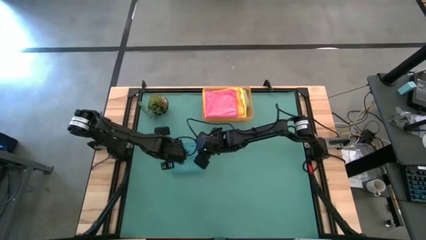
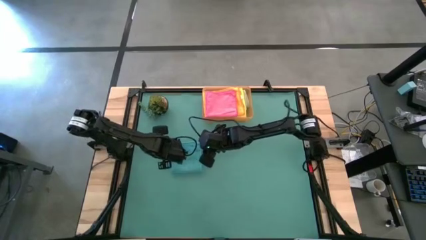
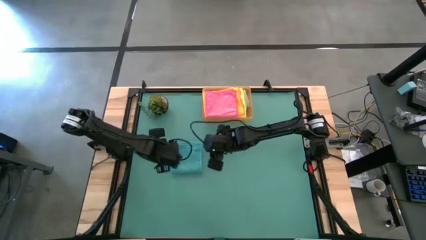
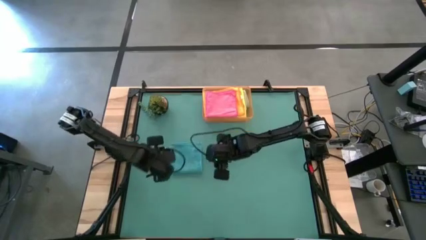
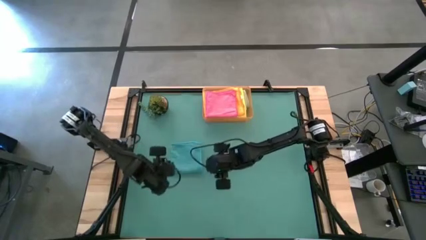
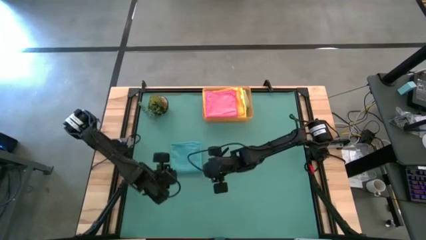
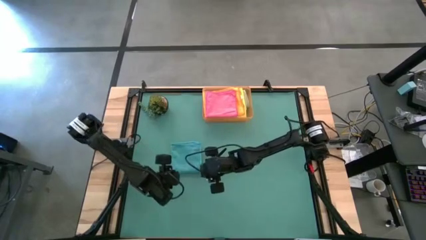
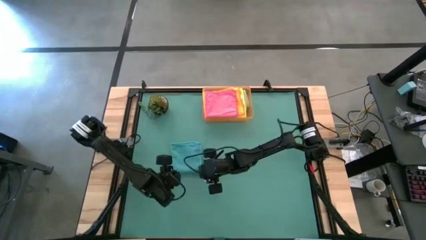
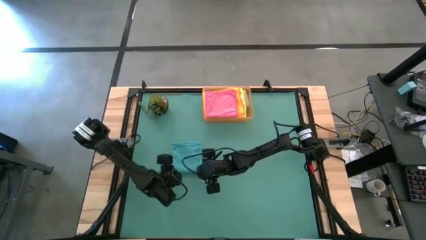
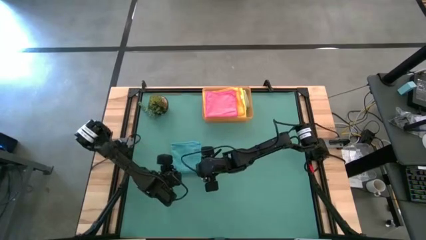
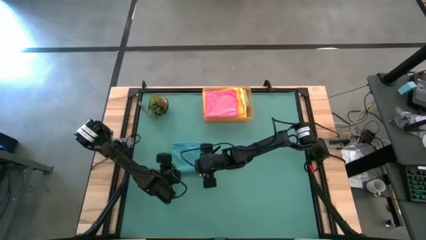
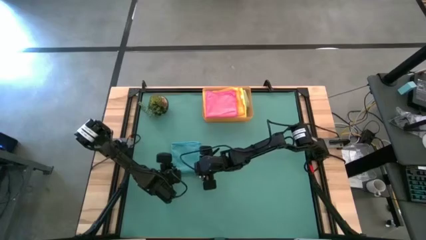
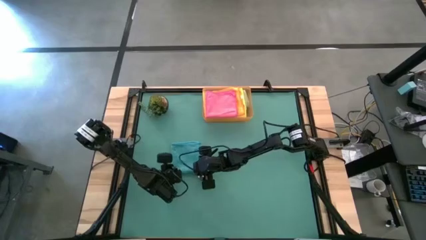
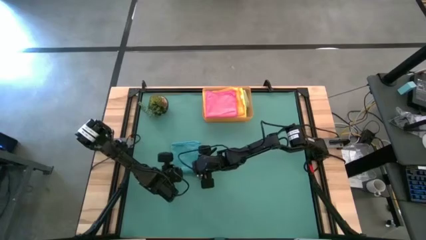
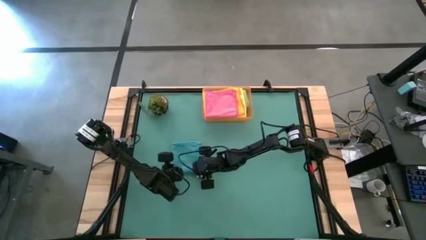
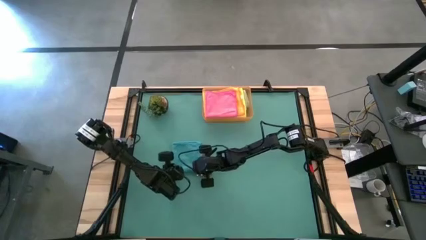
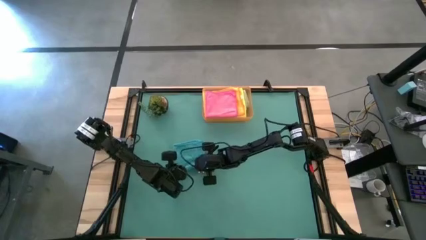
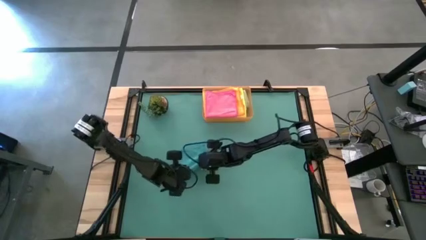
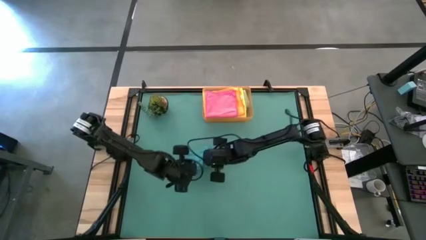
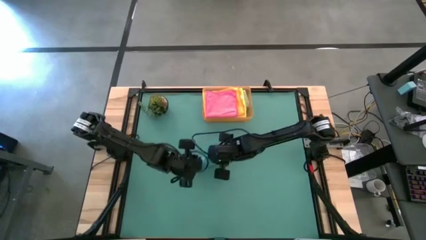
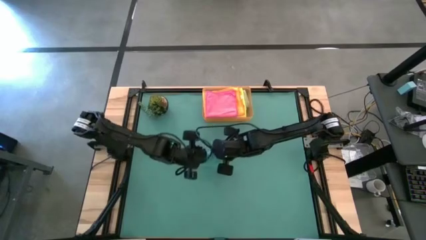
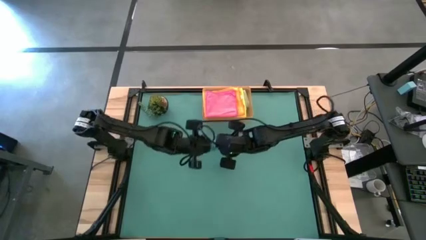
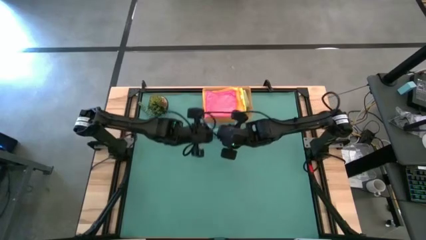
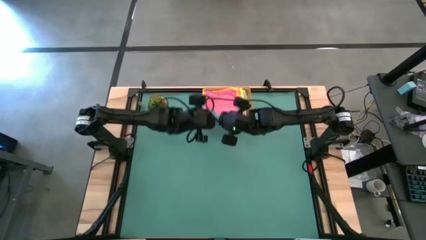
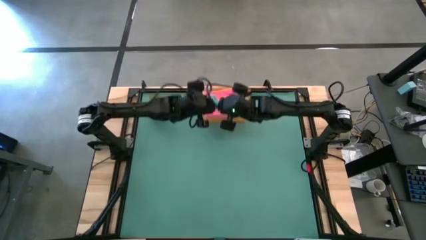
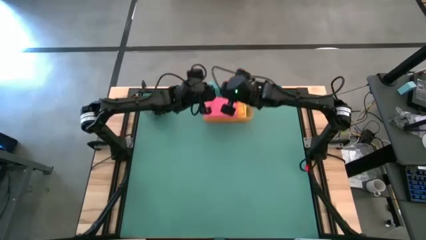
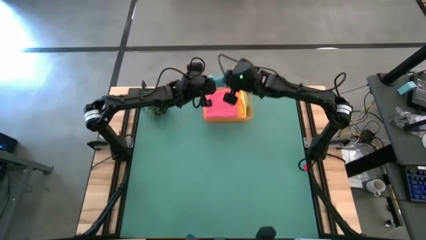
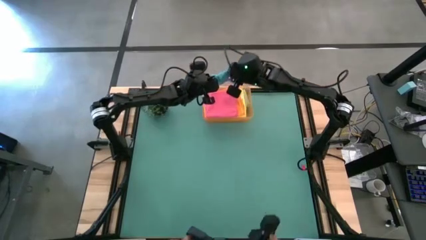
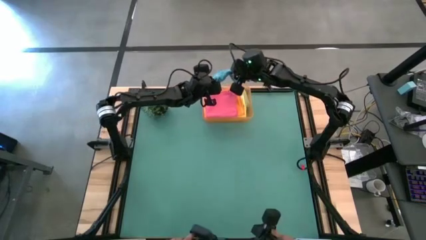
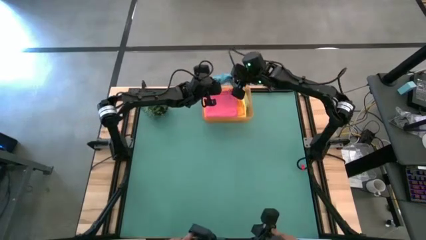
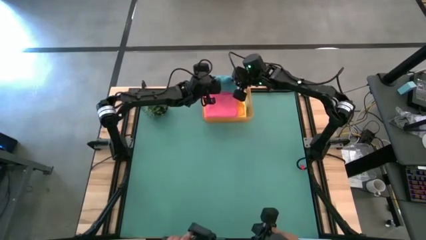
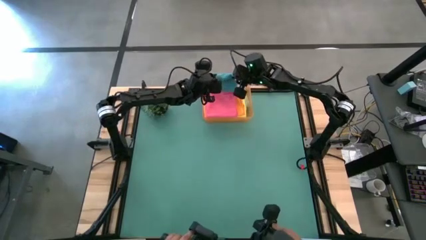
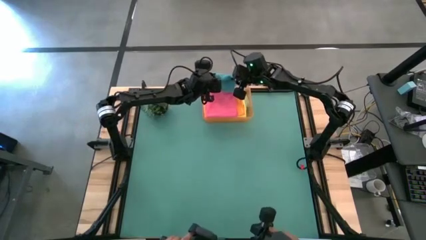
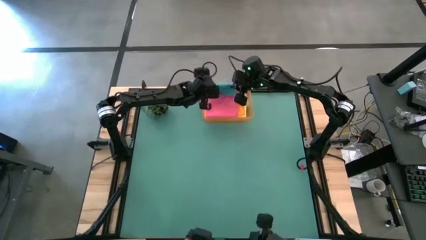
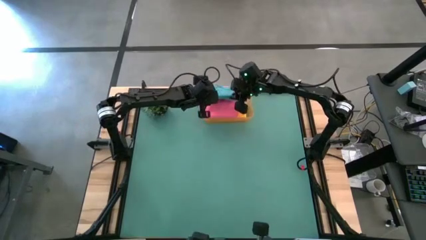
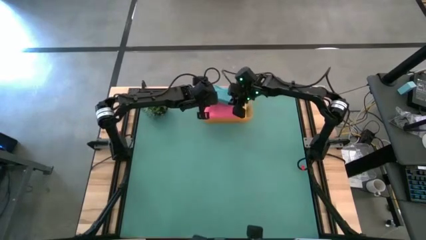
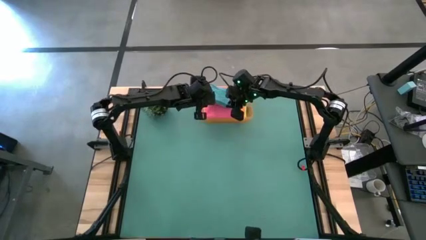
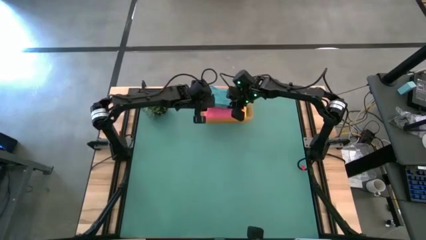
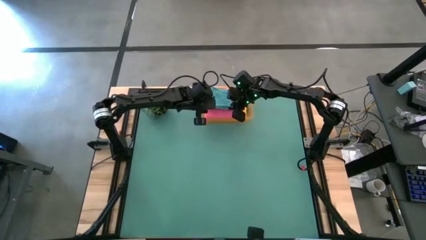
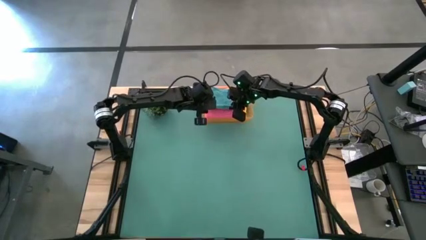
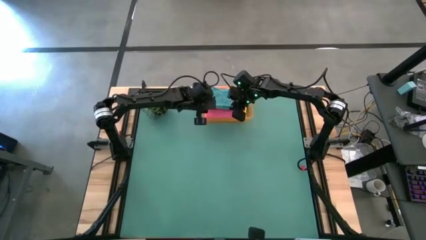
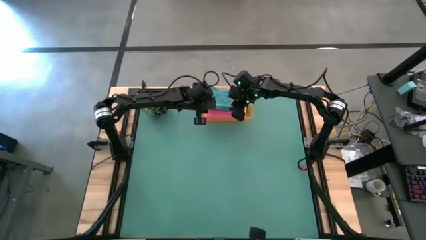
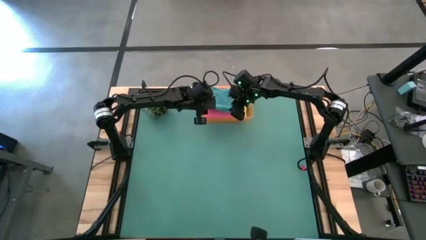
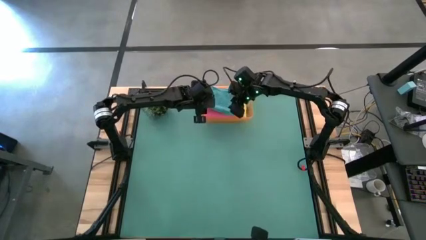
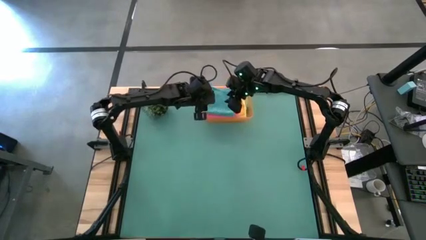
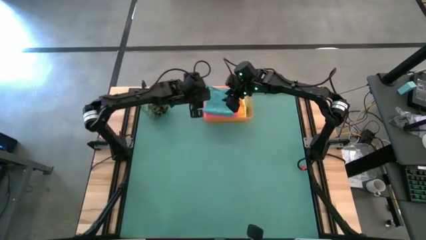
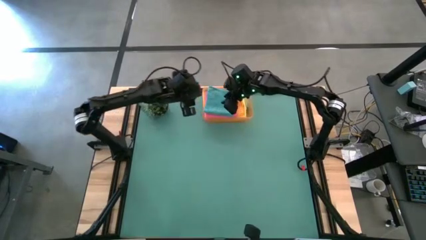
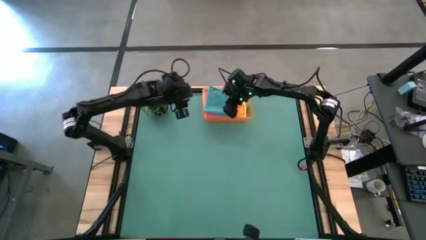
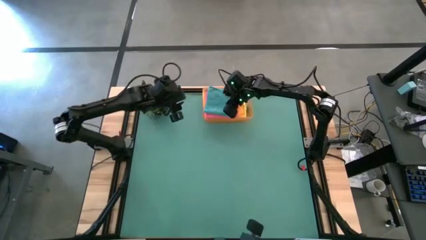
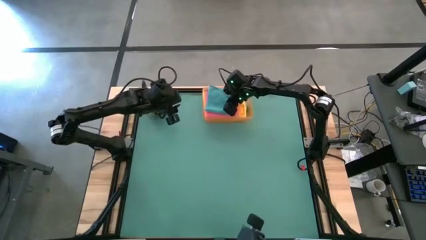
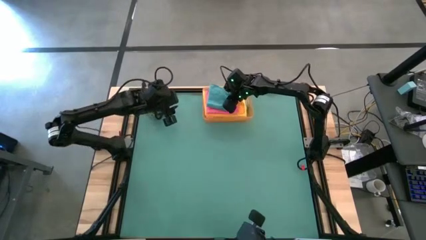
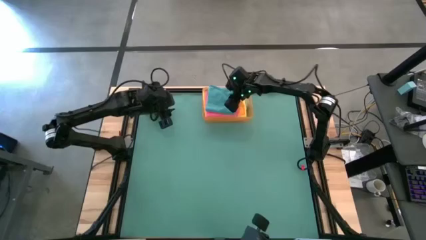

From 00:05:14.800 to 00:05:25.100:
Task: Fold microfiber towels
Put the folded green towel into the orange bin

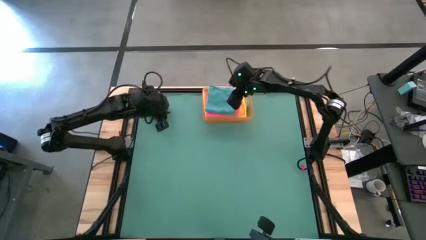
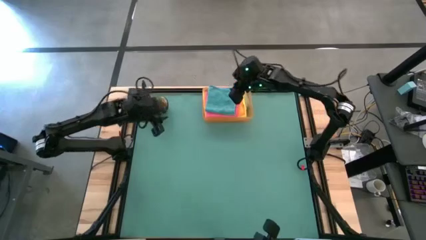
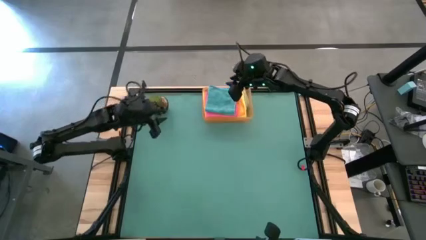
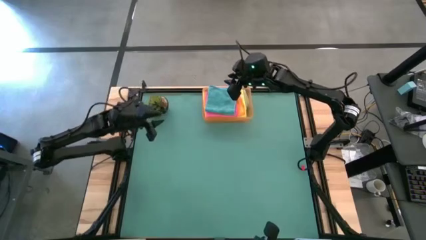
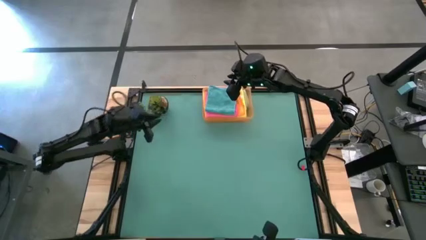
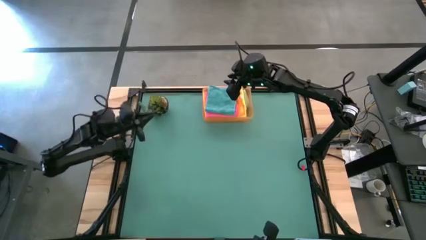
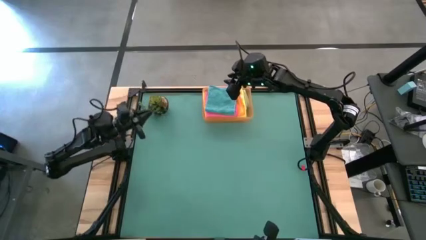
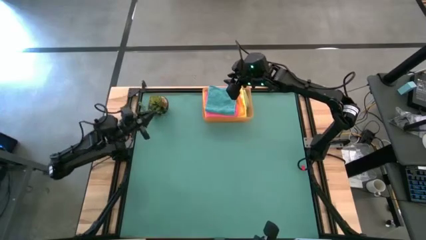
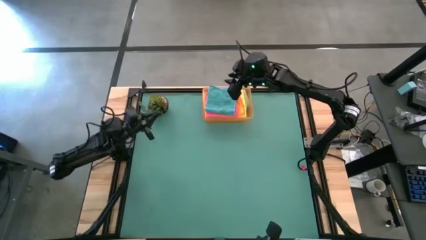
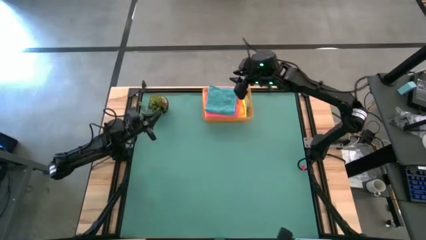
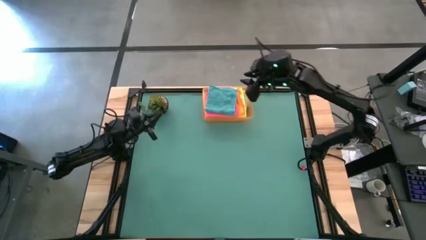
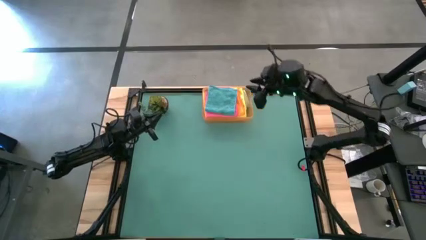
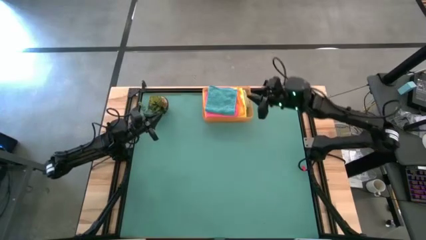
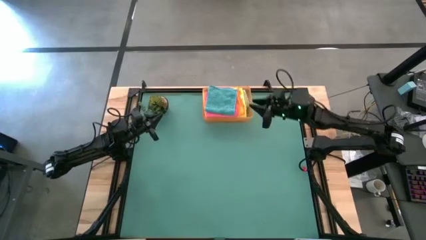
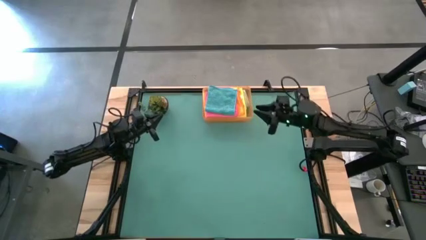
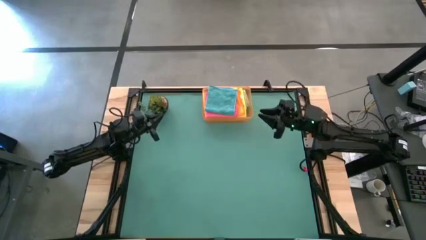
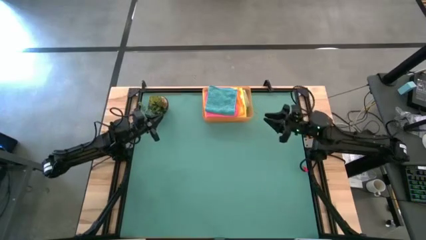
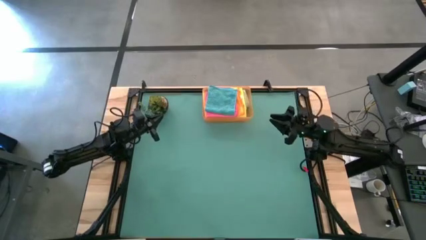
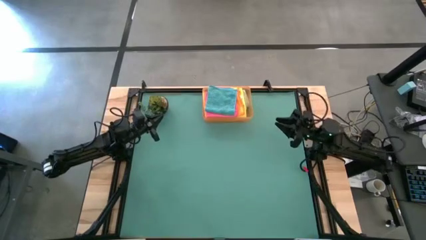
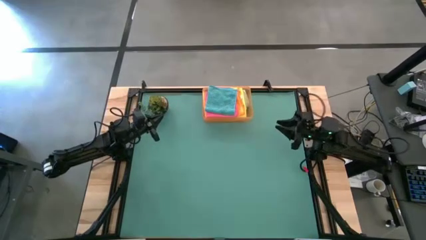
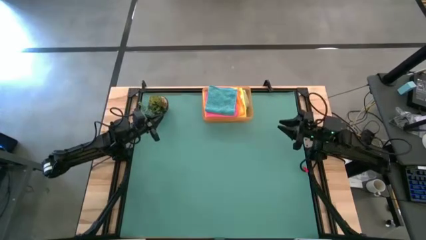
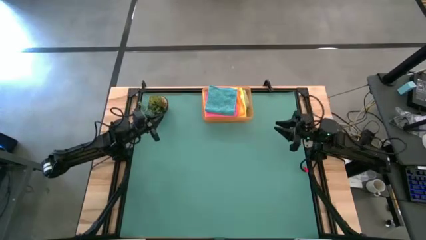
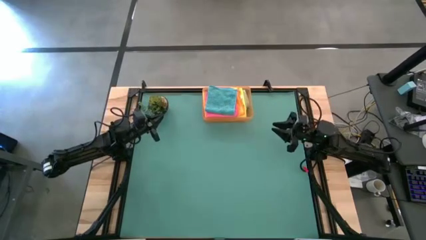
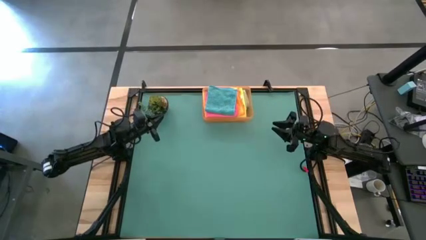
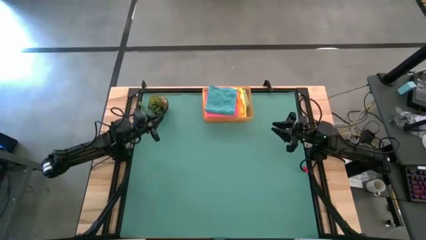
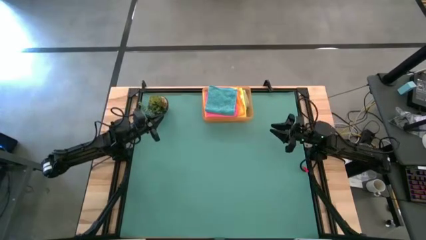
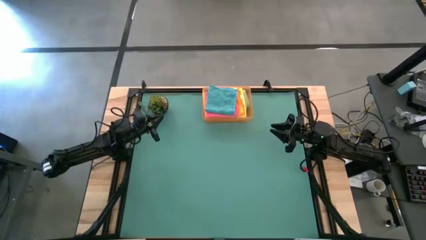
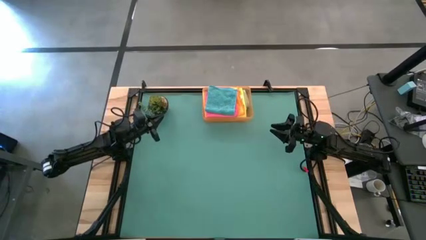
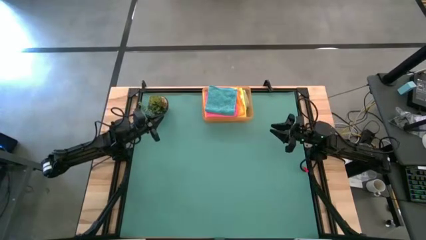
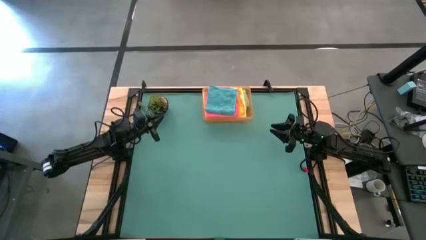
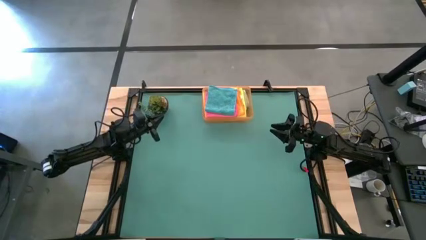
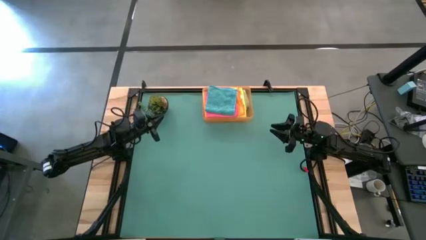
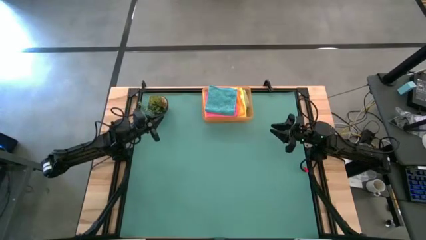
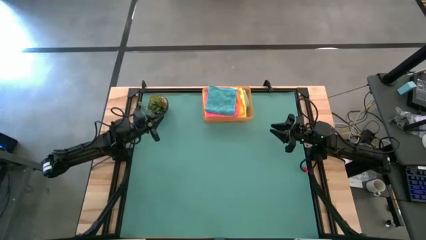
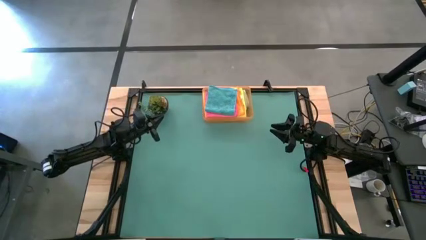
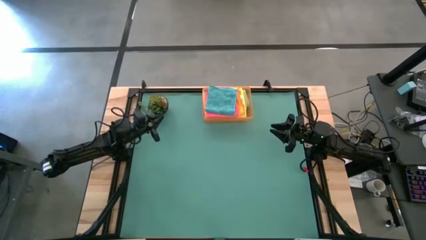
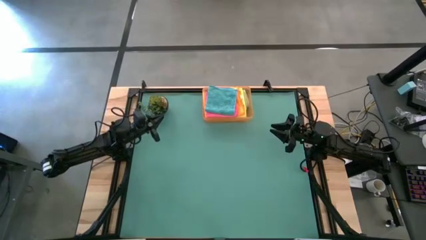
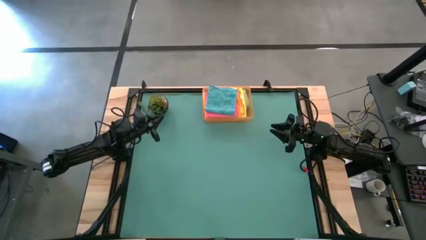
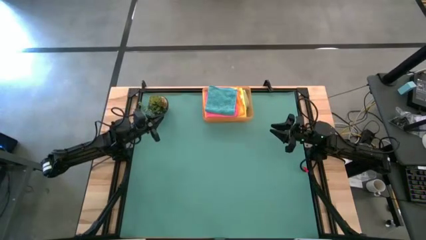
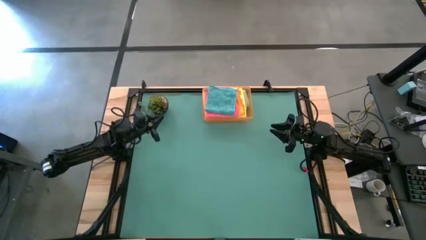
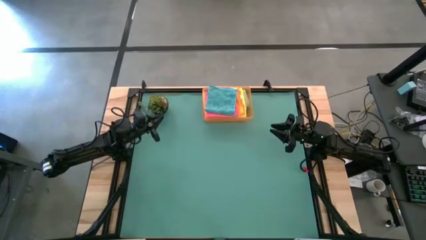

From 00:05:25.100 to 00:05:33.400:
Return to Home Position
